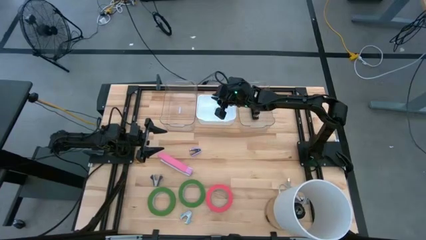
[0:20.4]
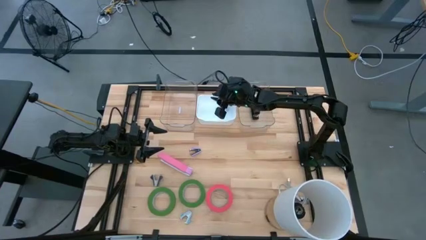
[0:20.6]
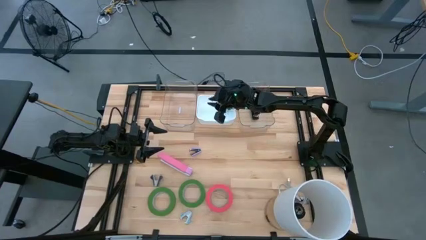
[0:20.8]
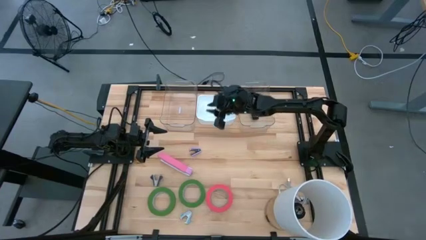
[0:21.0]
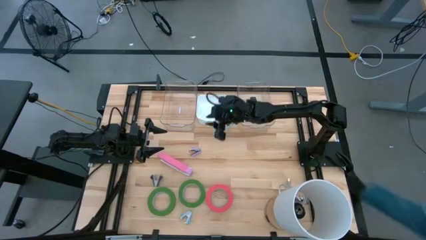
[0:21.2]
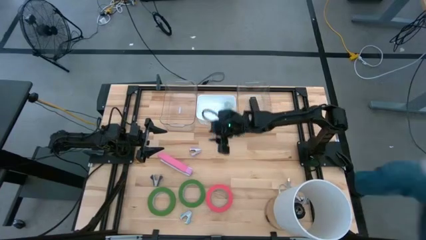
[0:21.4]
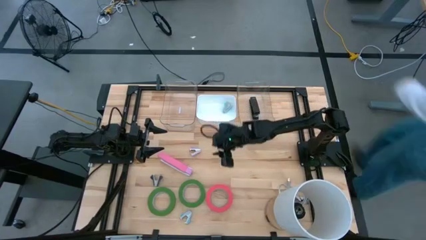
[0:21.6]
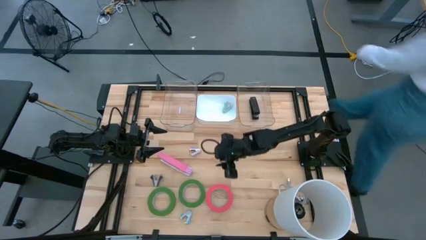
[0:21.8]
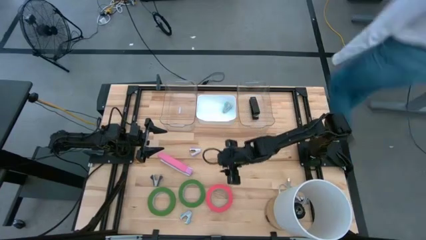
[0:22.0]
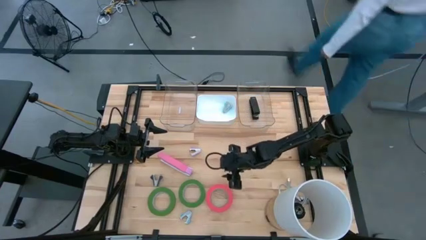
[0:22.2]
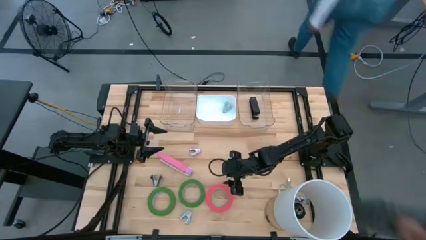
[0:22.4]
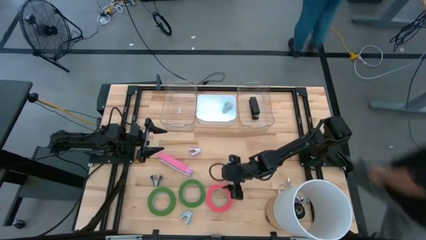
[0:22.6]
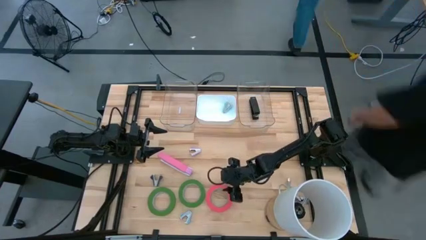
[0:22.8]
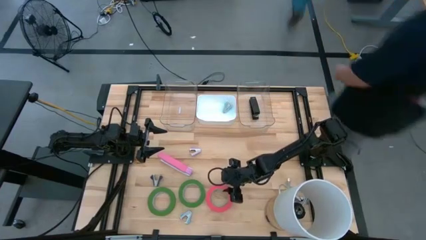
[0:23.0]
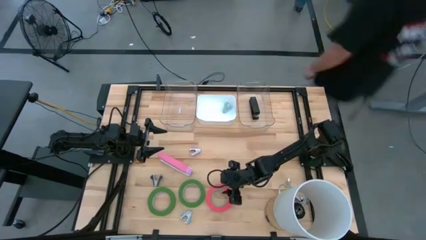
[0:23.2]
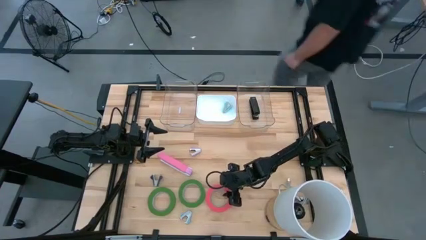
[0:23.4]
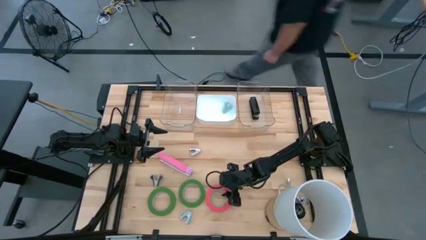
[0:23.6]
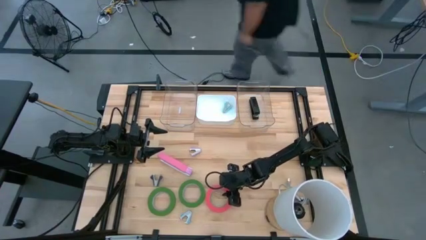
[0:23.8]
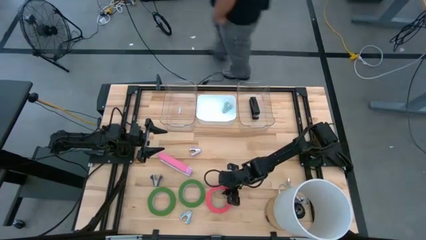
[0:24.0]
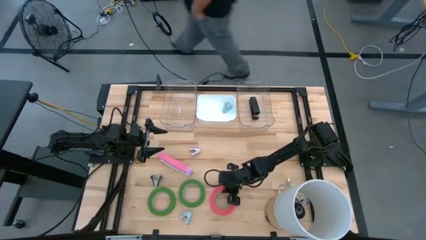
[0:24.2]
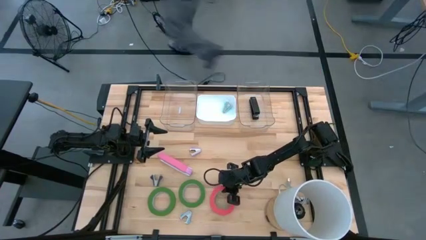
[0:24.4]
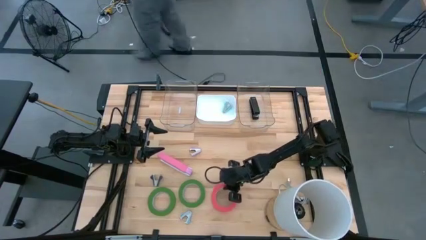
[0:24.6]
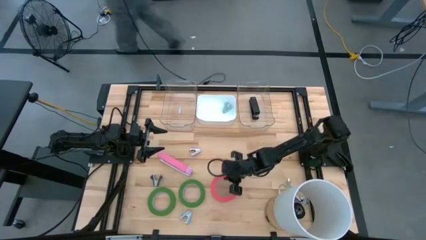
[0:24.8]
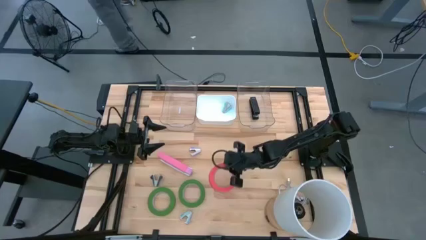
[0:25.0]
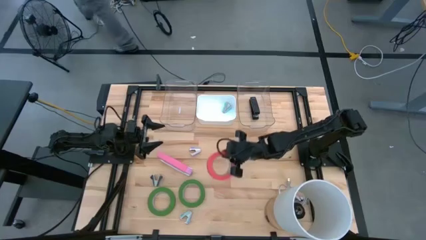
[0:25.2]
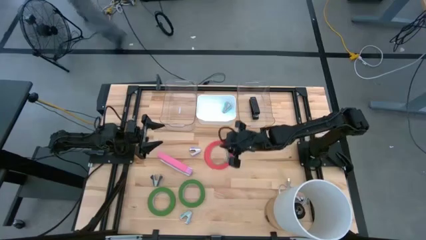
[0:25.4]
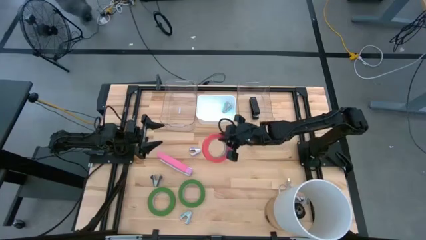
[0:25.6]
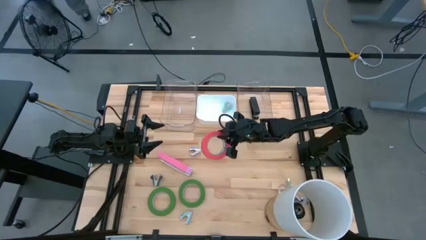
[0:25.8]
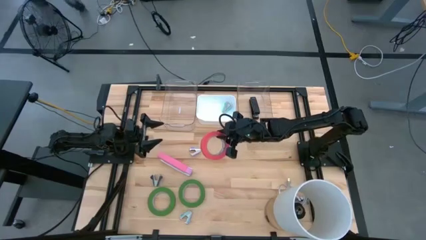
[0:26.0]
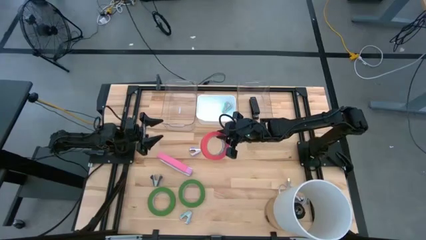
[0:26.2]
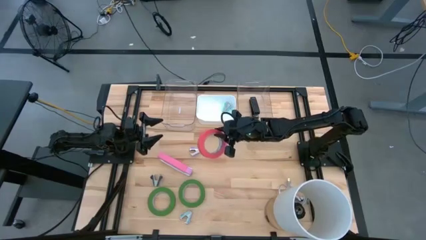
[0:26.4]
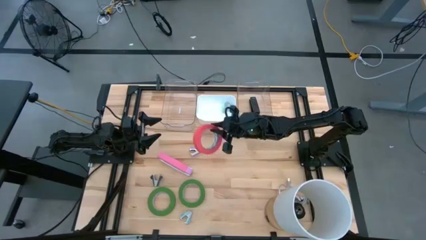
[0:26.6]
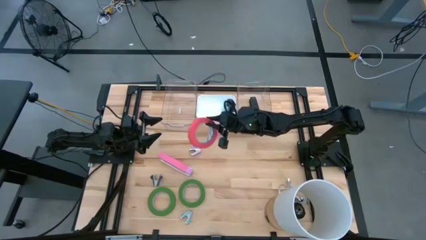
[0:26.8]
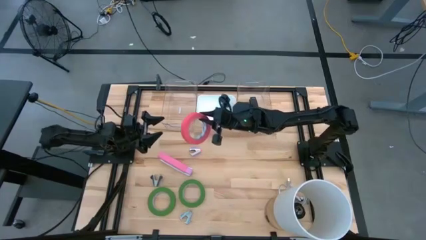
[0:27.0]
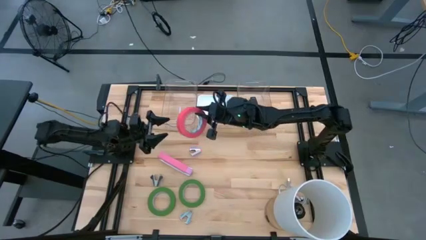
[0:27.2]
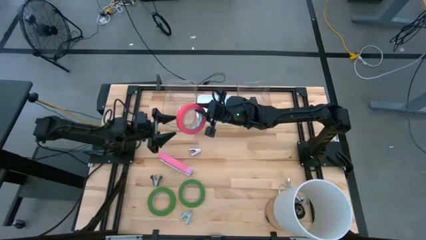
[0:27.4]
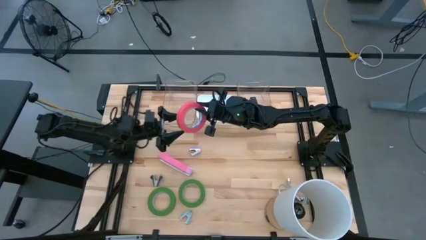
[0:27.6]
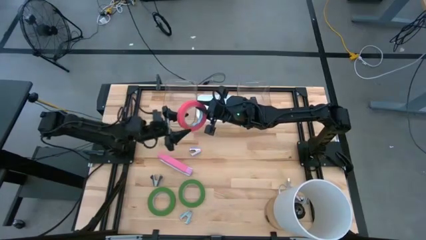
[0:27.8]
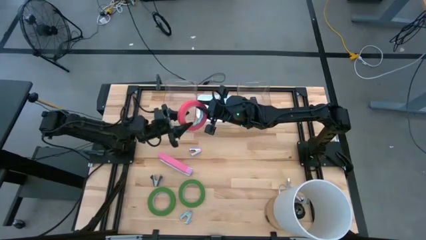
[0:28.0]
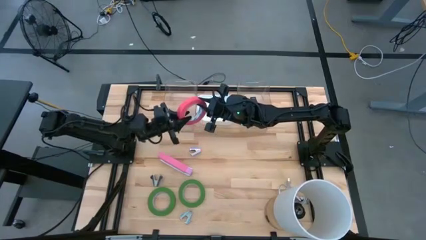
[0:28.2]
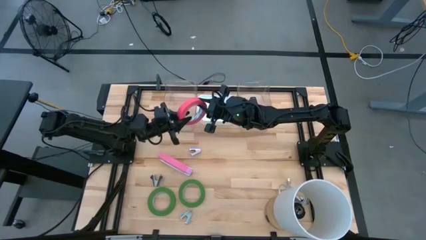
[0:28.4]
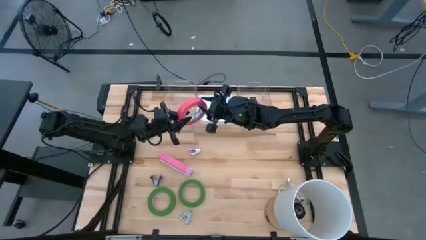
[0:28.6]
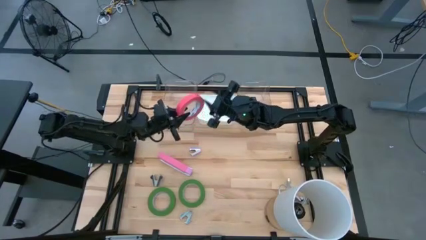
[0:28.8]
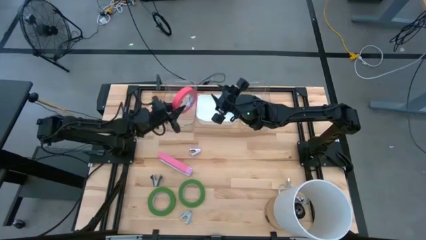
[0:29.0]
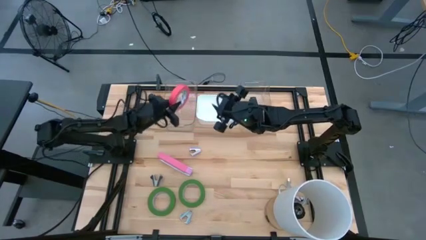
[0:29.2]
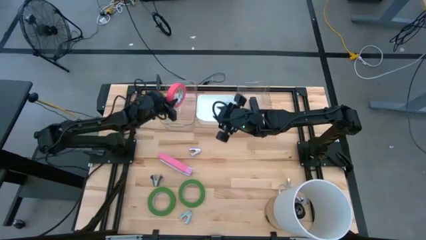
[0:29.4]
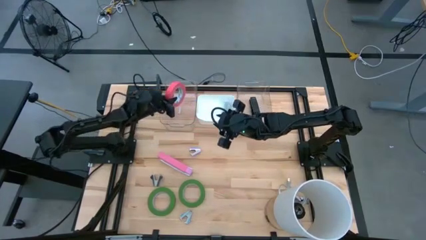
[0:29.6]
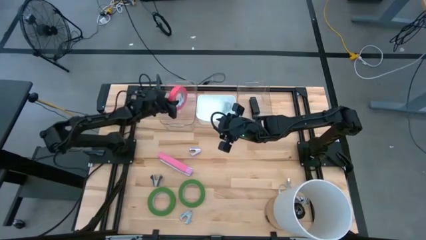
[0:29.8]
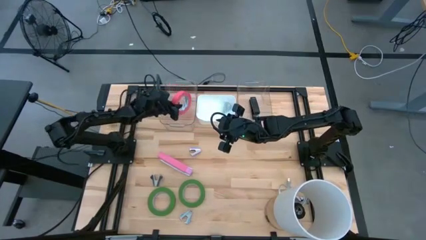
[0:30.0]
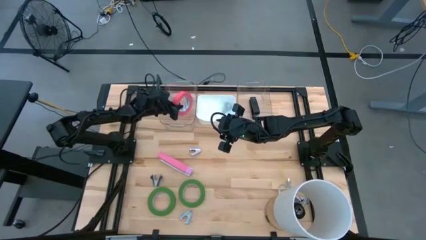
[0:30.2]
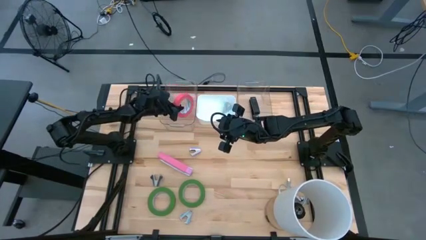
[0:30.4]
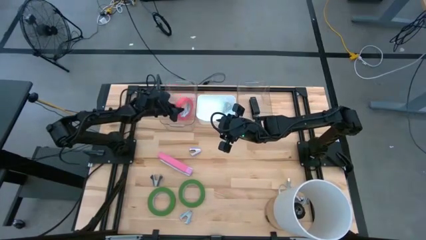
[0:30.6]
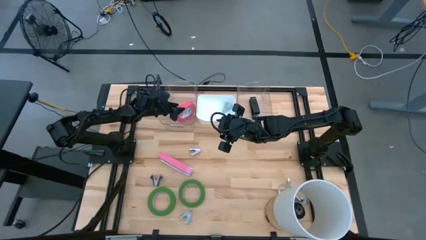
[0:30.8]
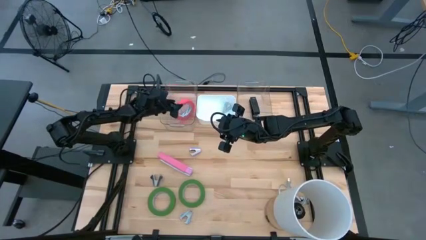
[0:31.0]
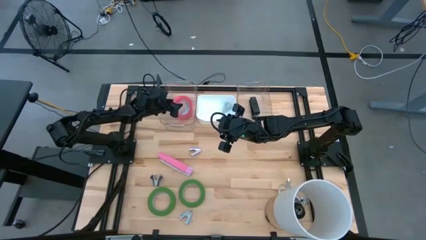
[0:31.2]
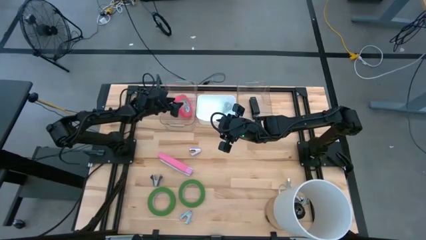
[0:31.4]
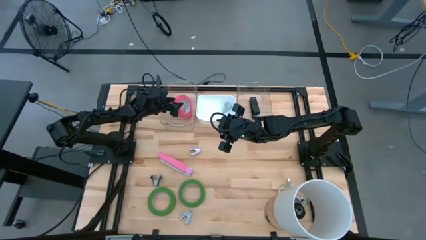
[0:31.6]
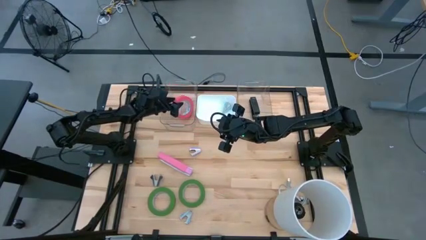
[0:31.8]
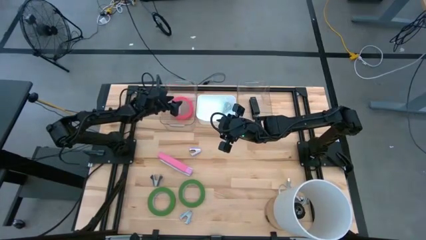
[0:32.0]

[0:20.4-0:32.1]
Task: Pick and place Stapler, Stapler remover, tape
Put the pink tape into the left transparent bin

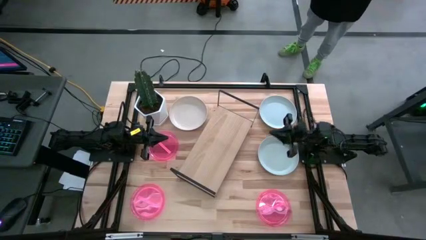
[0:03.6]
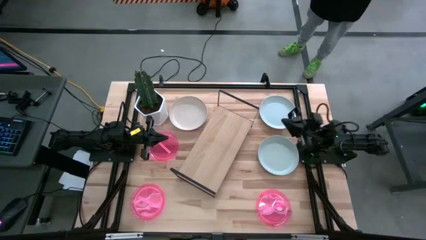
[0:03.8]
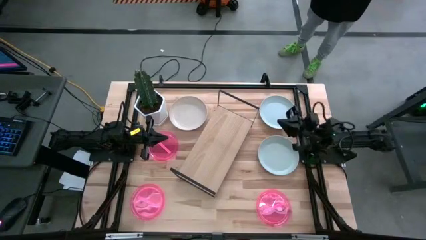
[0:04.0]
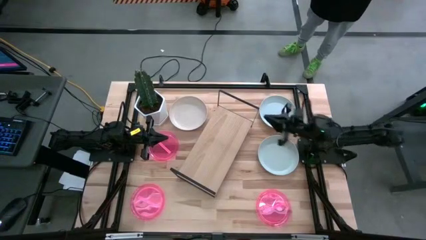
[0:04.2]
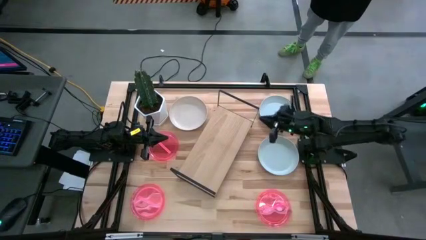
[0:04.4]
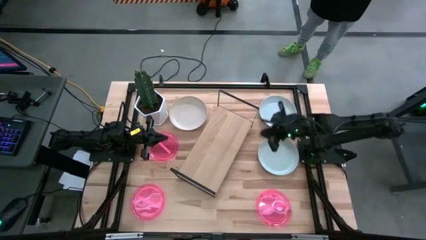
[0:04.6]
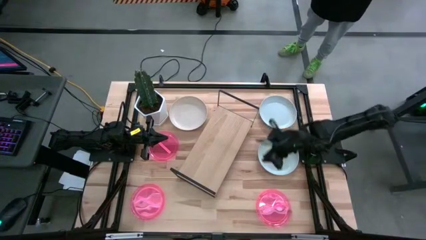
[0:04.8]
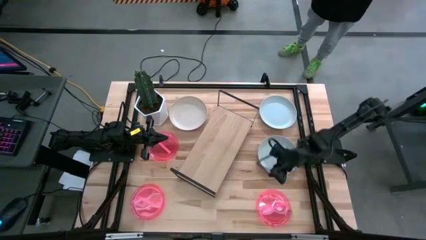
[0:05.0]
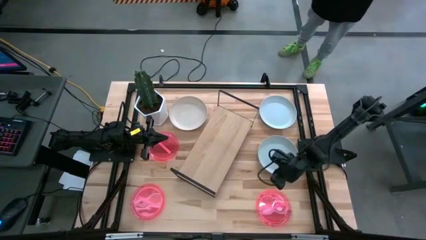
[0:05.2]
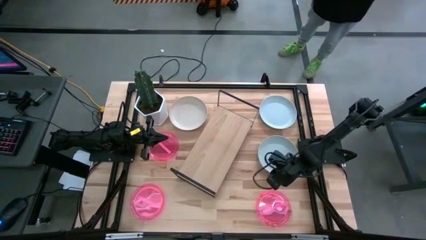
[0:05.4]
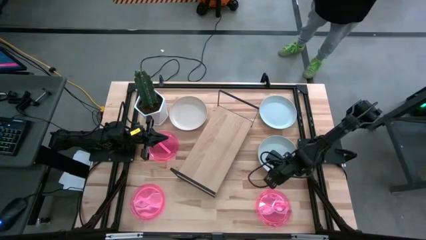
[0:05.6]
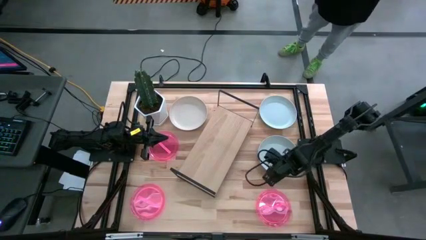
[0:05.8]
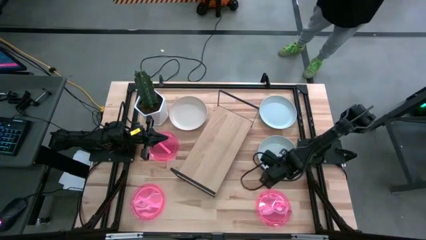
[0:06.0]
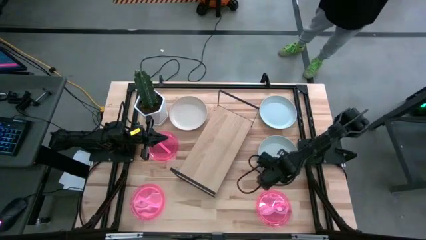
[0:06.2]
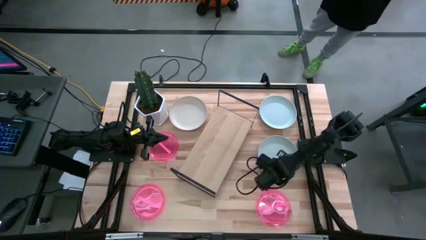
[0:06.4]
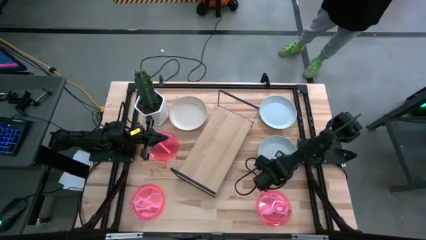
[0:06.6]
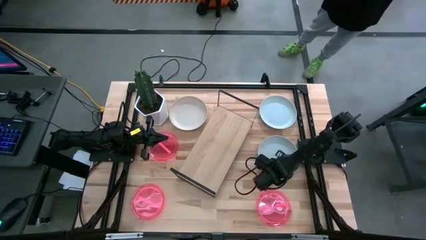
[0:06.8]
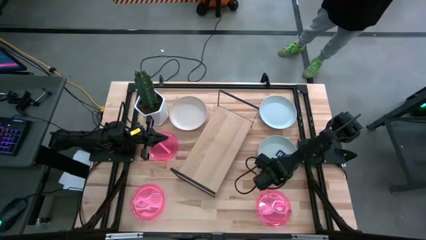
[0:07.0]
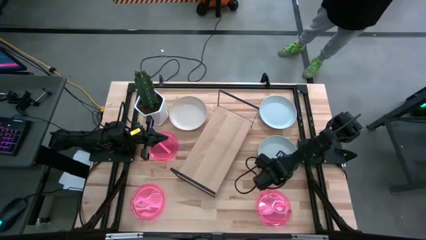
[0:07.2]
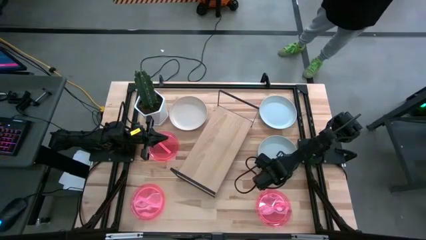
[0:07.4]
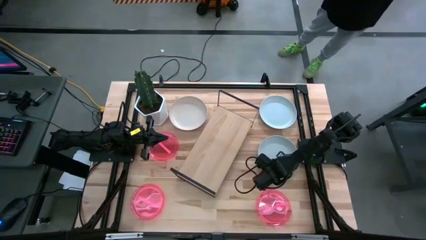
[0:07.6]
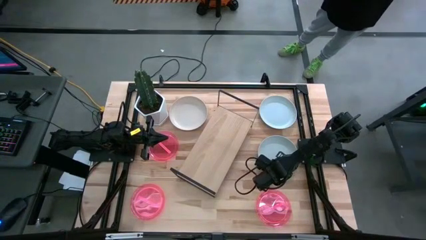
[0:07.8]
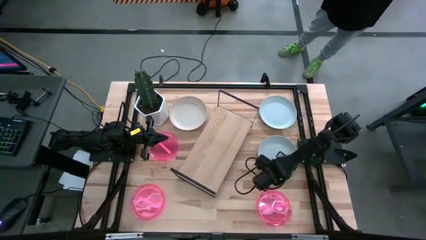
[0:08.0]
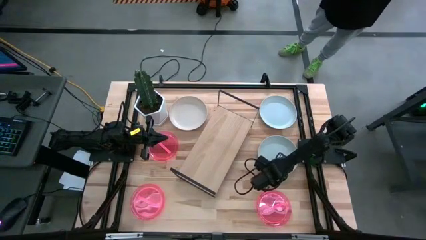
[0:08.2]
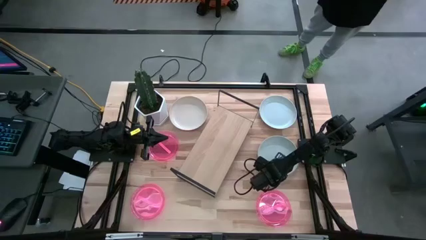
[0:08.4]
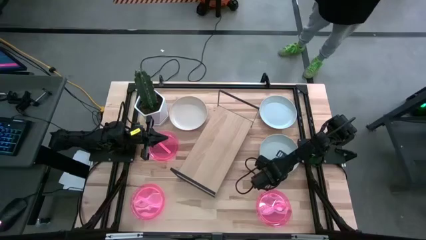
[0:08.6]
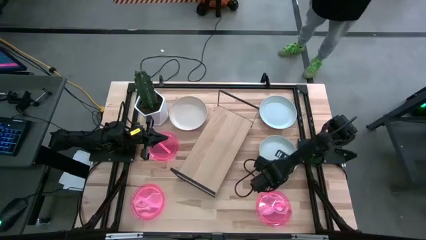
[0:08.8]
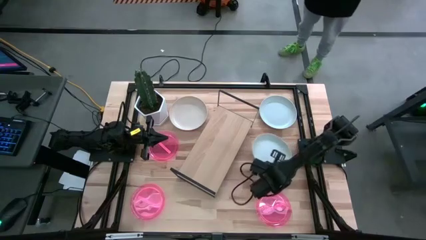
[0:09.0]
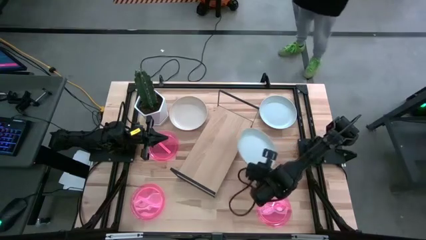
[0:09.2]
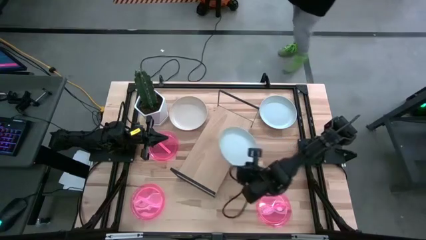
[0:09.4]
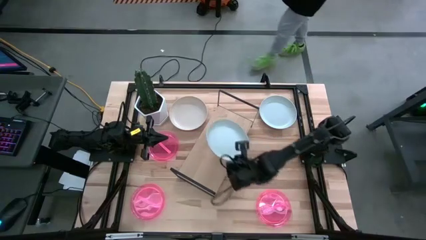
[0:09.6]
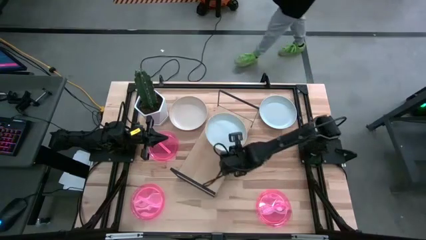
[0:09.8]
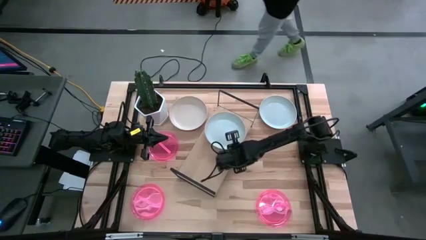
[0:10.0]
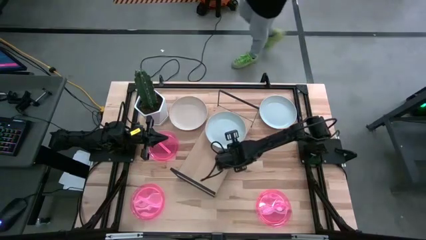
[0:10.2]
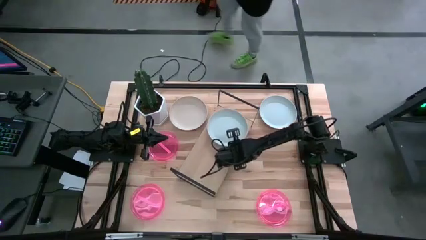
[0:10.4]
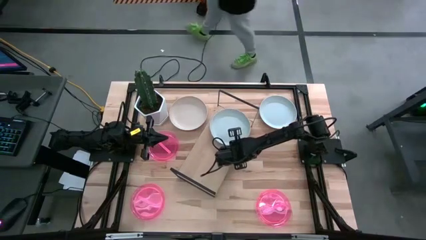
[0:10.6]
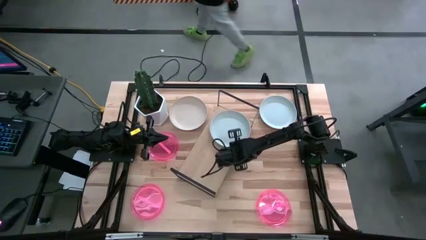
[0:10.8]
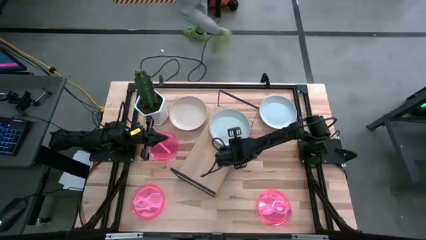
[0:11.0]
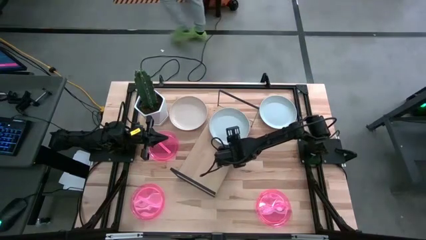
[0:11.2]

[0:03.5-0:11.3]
Task: Place and stack plates onto a shelf
Put the bottom right white plate on the shelf
